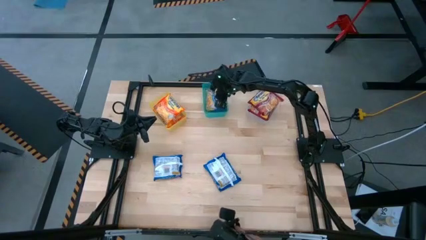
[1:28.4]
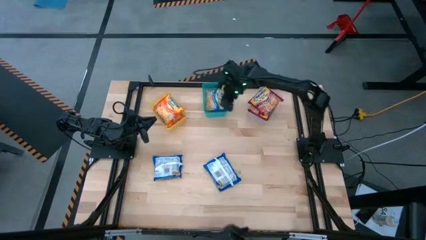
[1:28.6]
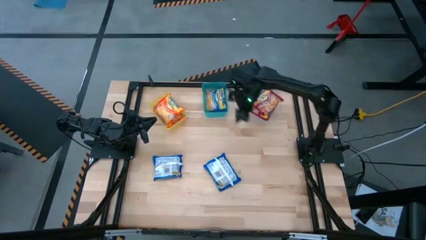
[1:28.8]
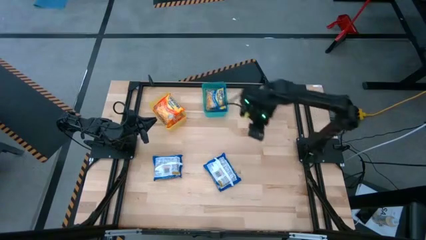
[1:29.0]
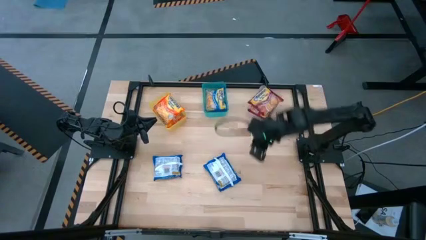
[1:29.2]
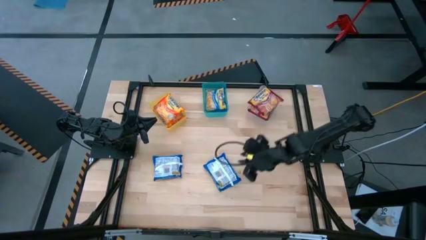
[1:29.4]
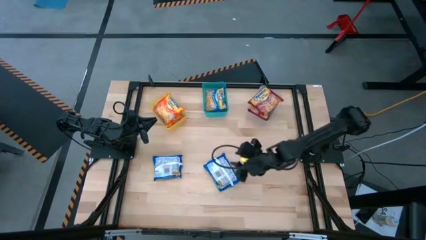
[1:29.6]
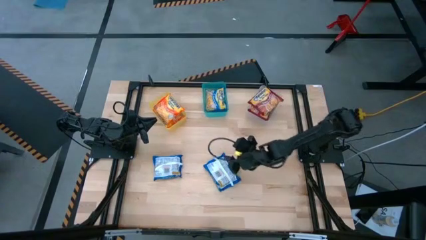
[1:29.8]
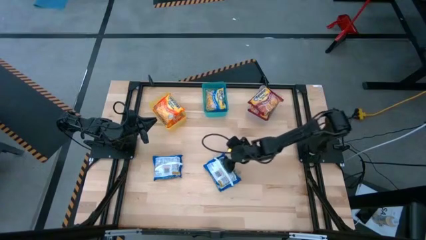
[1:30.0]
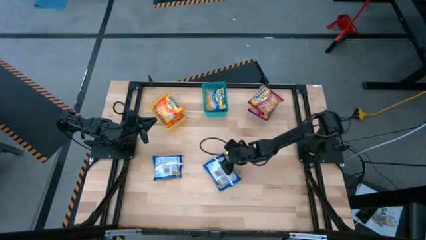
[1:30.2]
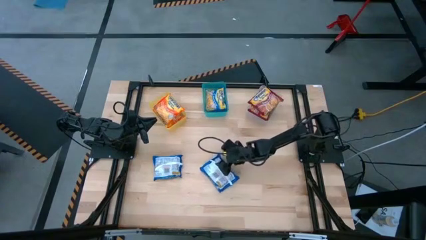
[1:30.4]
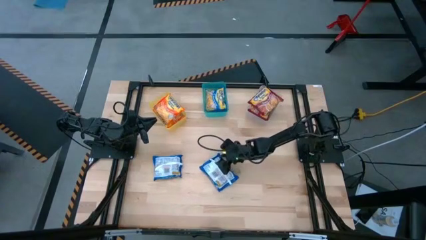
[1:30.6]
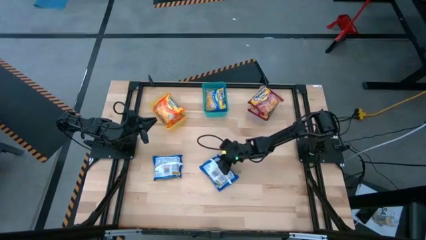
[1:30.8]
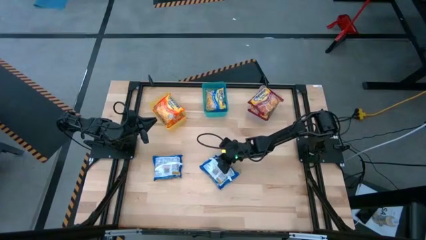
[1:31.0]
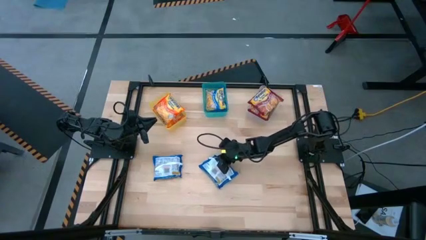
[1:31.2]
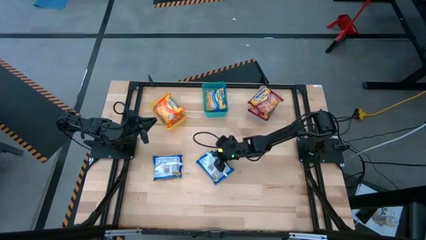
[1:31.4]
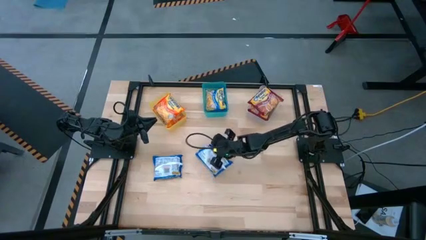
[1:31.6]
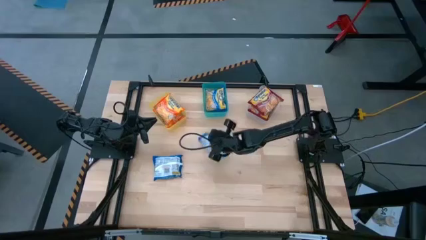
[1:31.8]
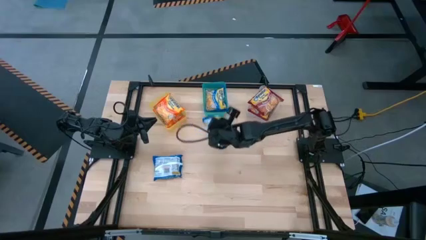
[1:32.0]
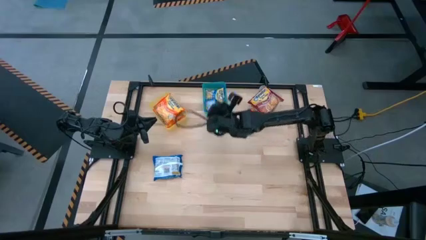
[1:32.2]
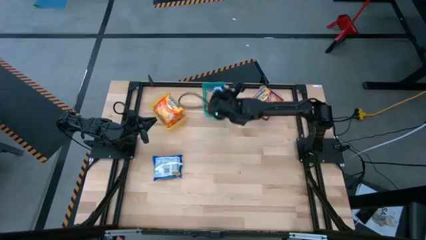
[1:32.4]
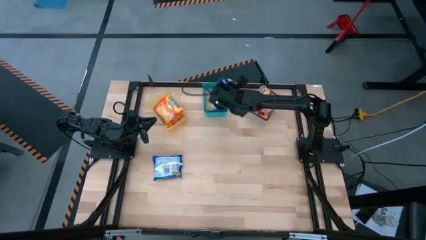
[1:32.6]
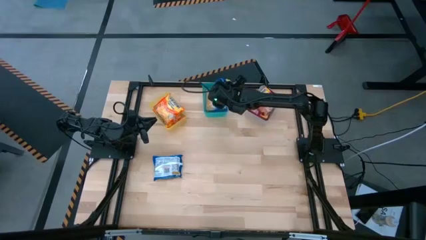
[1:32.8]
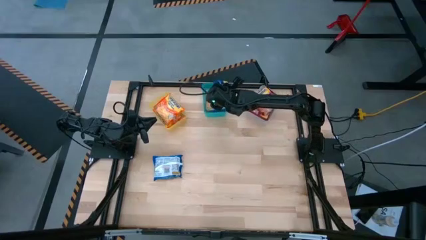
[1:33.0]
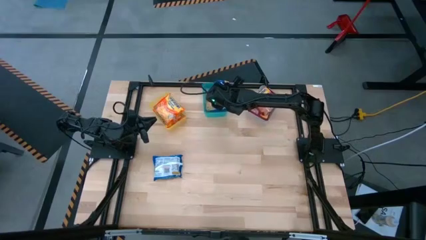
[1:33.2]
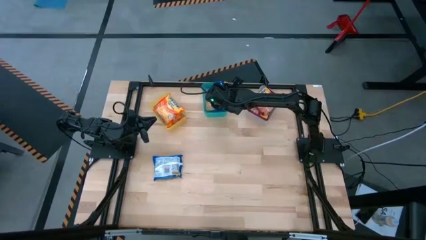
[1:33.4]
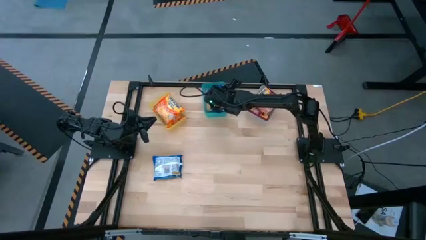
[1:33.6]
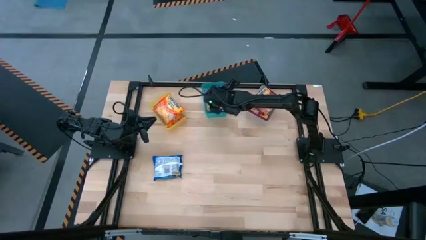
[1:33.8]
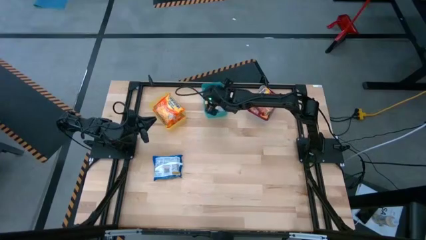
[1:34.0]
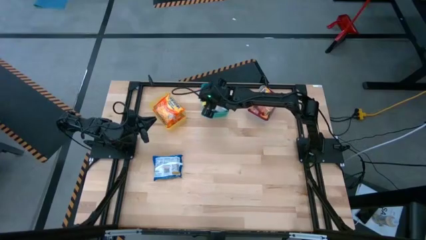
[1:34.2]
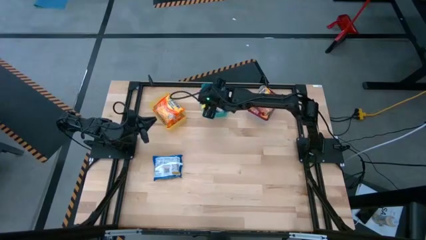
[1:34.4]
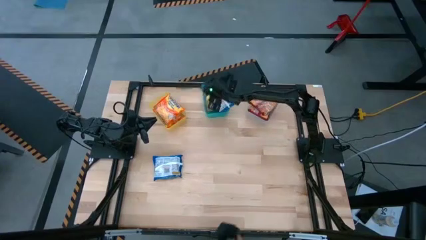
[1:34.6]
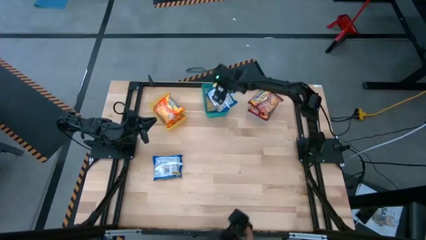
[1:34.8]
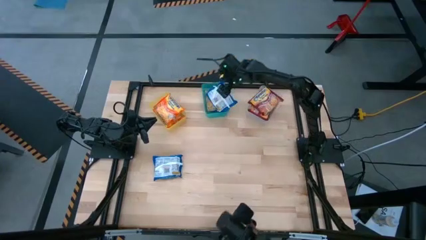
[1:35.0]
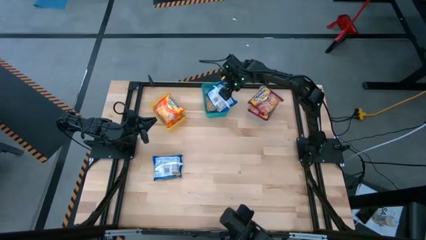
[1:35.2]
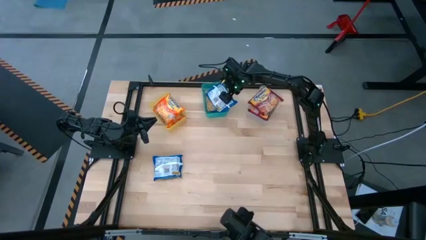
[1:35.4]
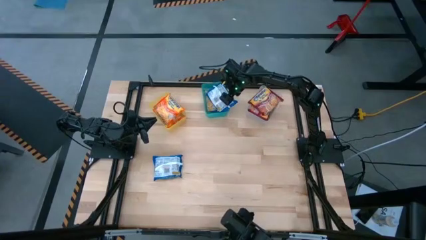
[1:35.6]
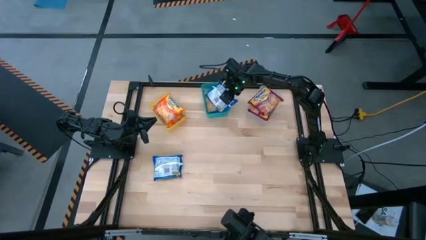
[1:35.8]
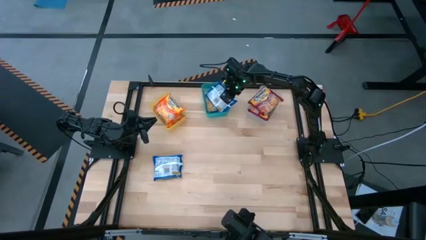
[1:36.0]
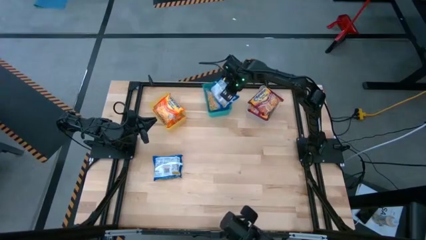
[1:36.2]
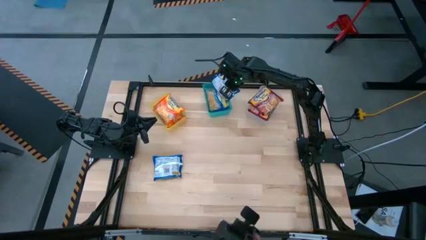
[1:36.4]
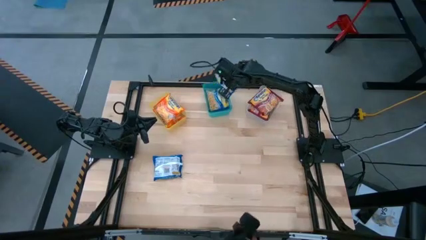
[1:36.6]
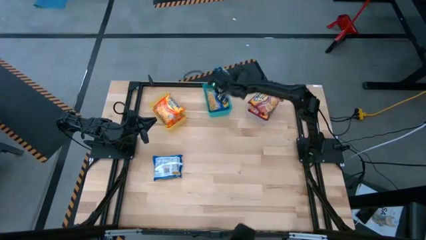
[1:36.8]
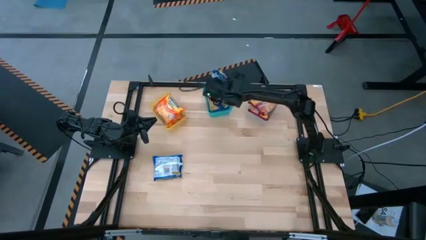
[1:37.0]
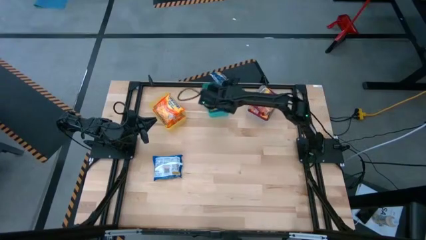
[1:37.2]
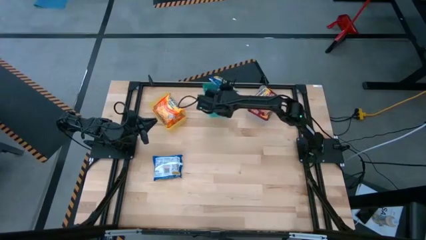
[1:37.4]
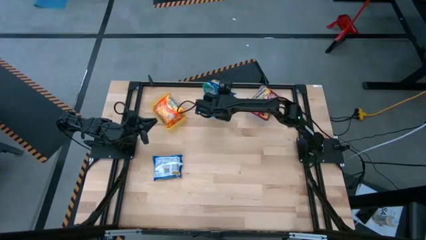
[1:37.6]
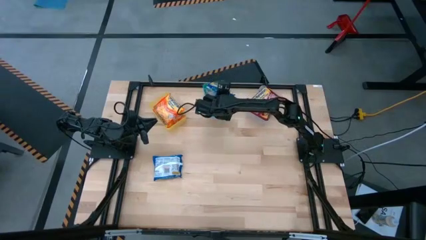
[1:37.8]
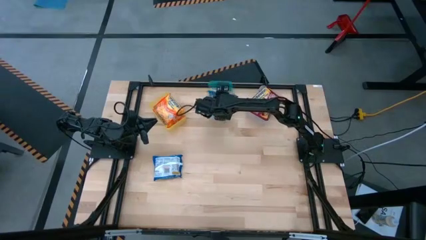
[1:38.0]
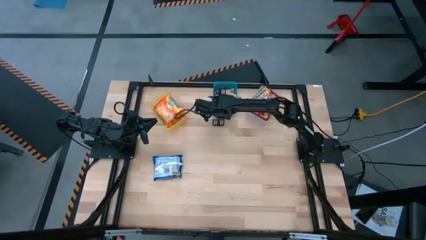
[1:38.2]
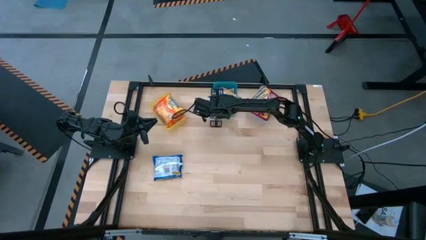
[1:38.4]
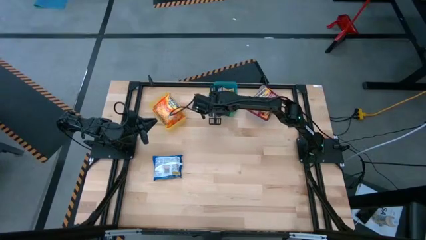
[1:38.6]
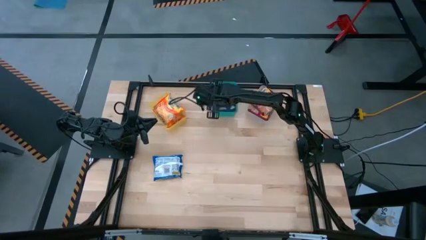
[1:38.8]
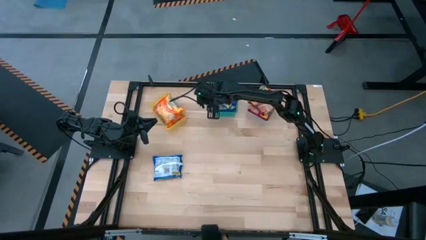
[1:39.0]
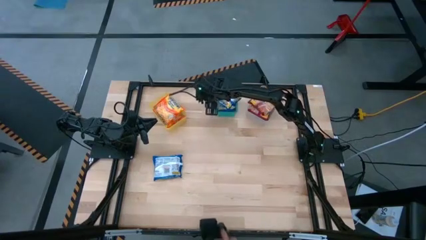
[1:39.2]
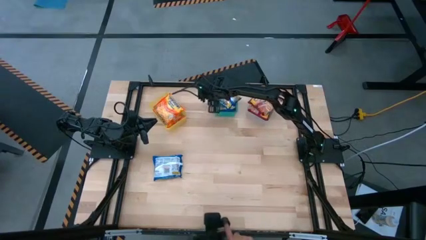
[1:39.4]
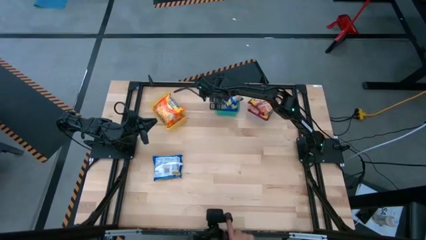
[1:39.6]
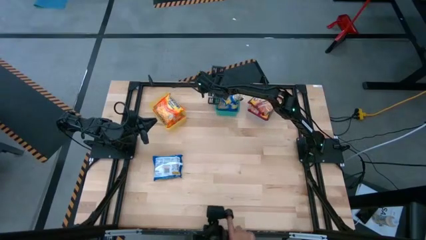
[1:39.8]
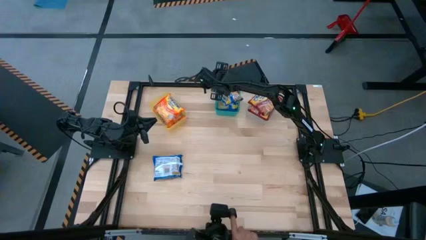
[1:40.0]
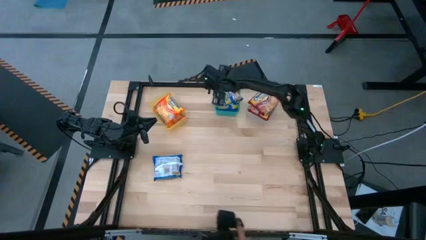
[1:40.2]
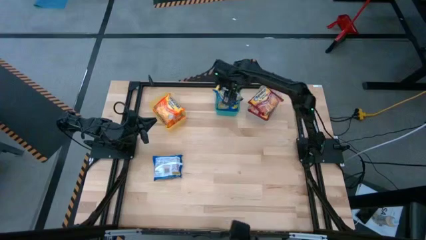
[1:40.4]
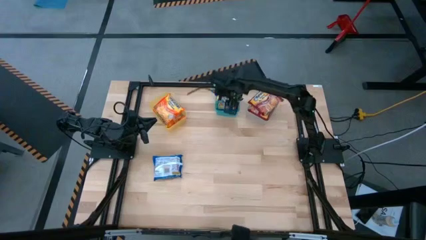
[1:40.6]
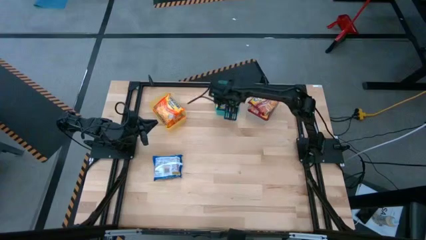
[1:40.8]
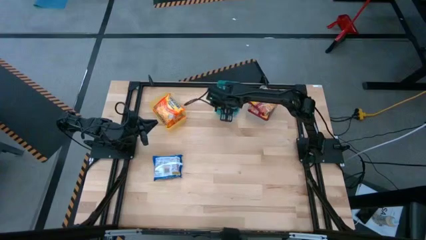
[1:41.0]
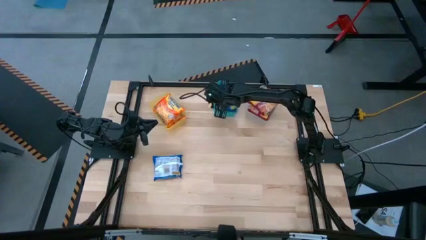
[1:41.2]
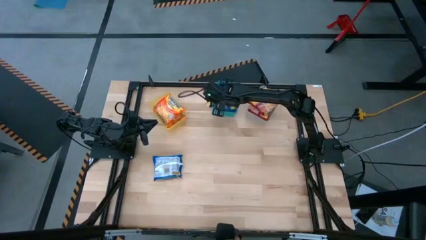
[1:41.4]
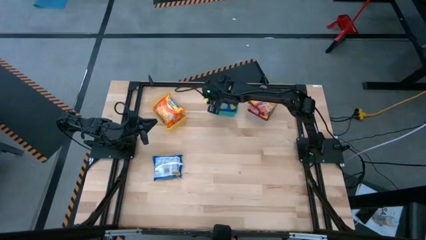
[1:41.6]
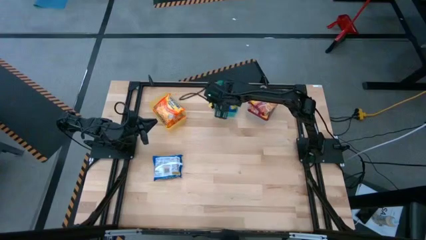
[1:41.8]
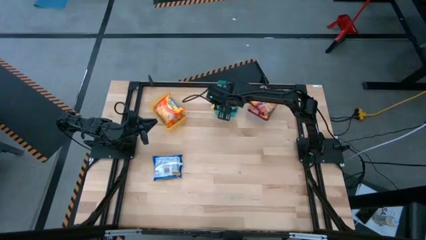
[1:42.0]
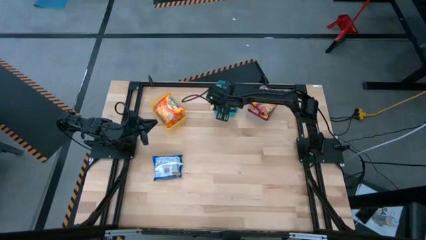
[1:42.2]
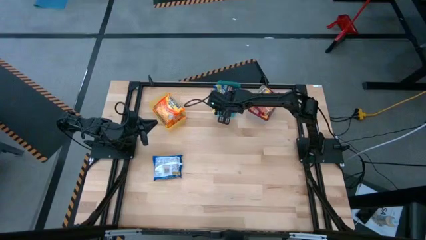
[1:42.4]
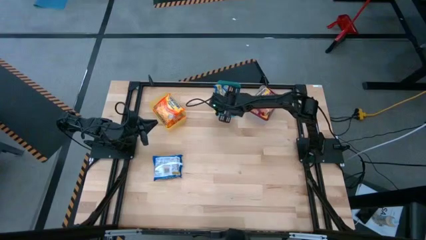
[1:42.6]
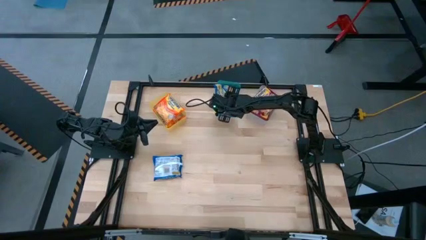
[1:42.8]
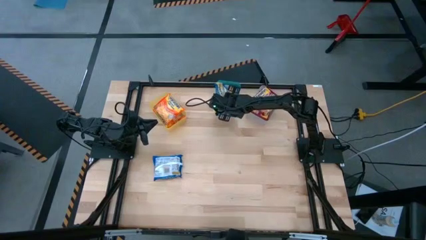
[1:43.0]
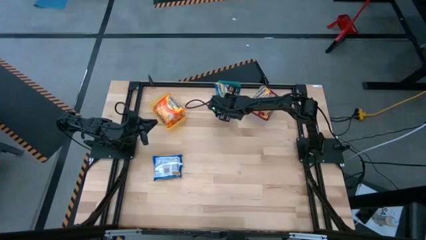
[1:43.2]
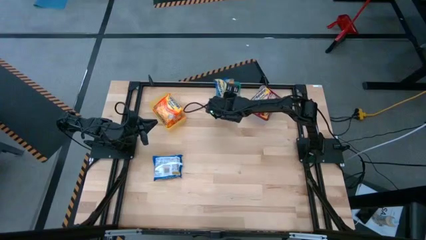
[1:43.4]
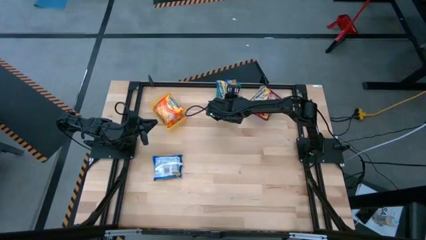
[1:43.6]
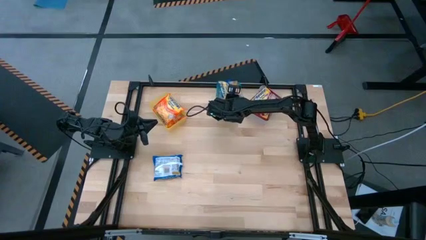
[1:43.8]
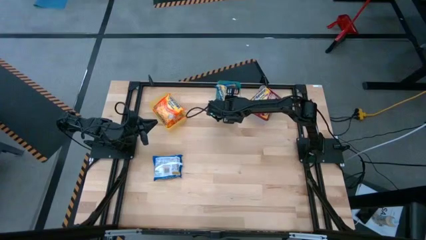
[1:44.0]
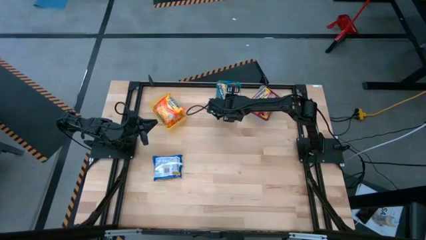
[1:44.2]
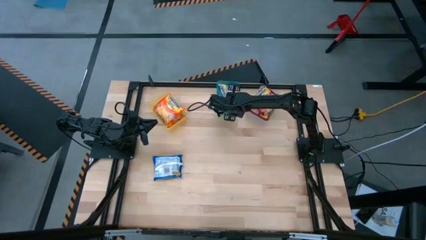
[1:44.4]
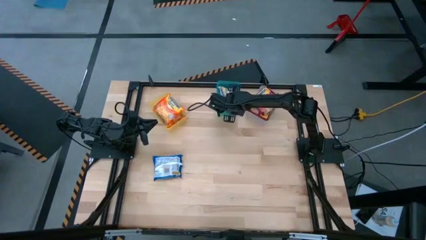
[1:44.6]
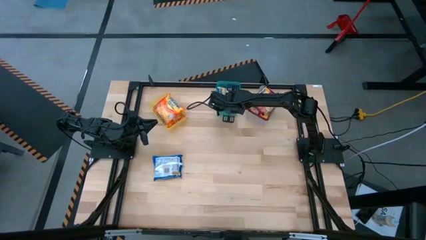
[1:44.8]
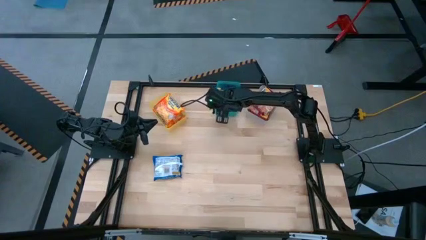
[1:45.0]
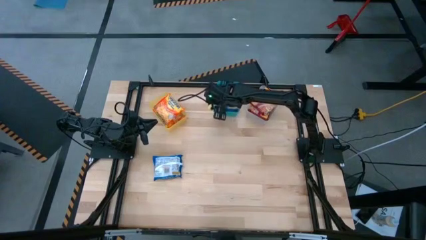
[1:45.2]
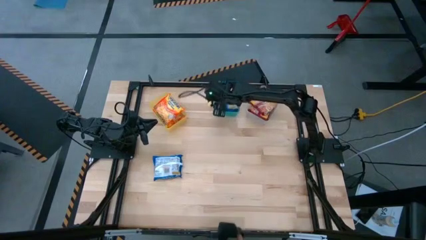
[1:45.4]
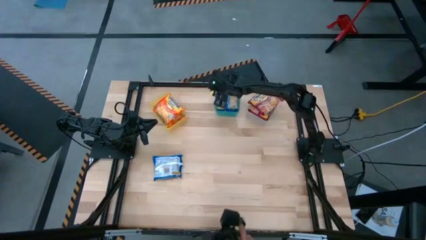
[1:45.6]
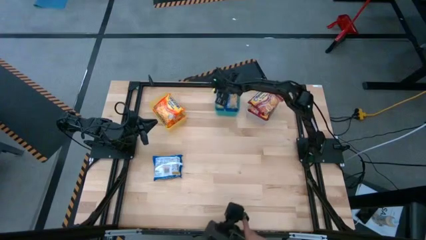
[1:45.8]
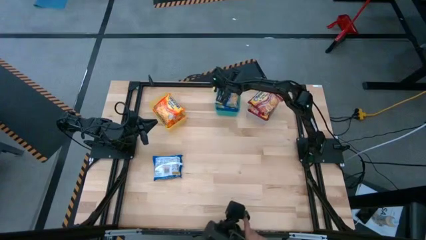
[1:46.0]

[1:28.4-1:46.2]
Task: Sort Maruchan noodles
Put the right blue noodle pack into the green bin
